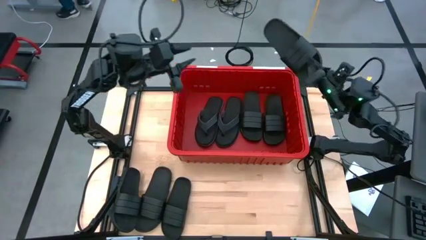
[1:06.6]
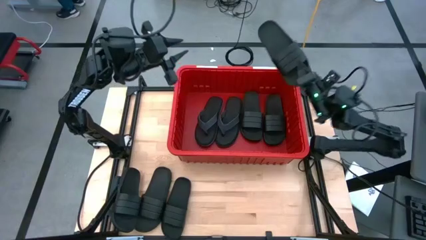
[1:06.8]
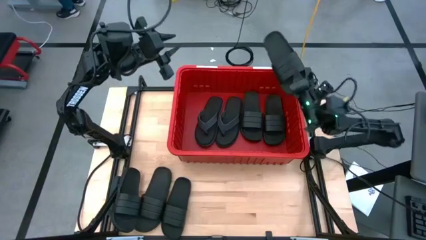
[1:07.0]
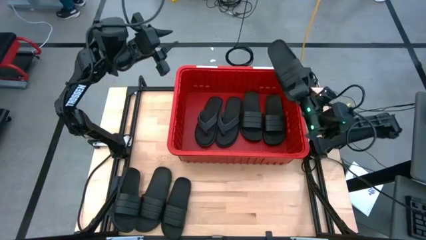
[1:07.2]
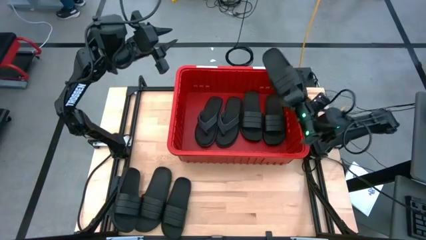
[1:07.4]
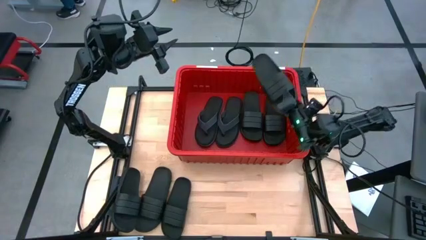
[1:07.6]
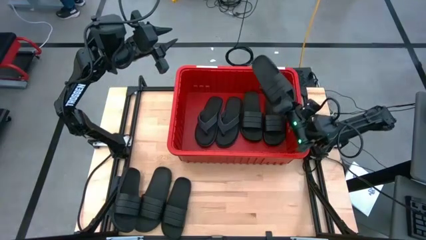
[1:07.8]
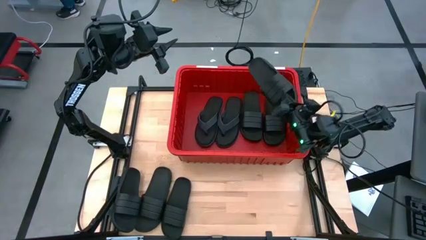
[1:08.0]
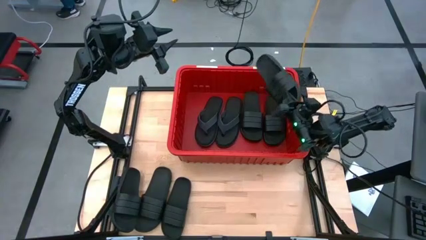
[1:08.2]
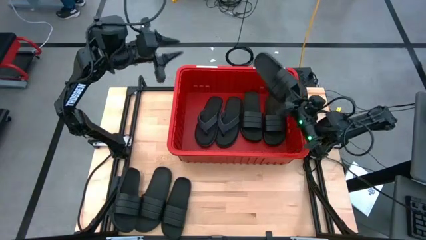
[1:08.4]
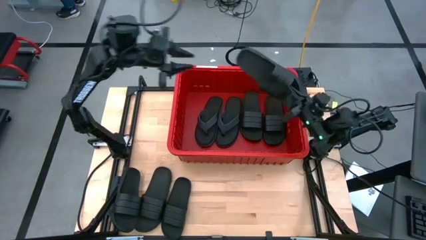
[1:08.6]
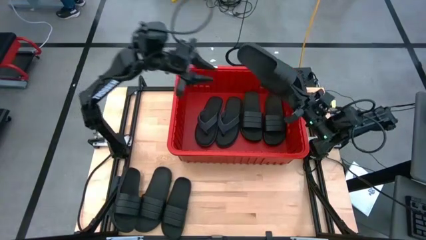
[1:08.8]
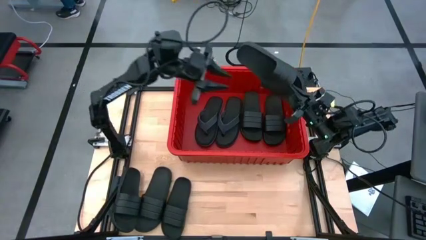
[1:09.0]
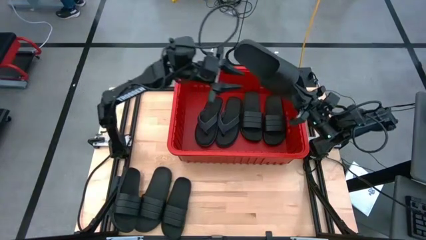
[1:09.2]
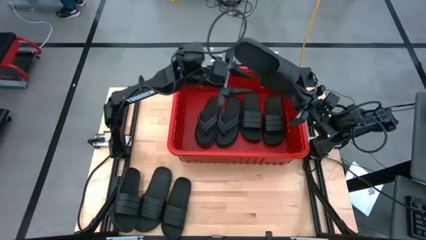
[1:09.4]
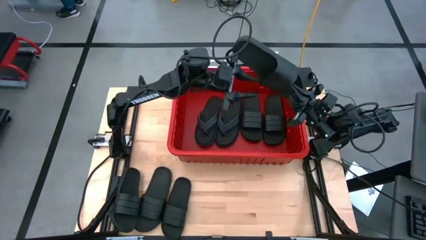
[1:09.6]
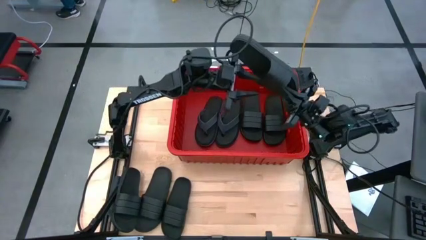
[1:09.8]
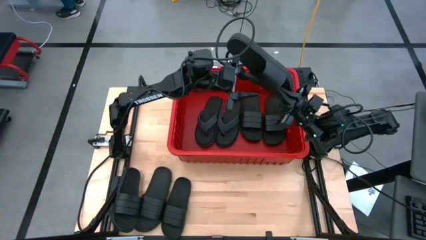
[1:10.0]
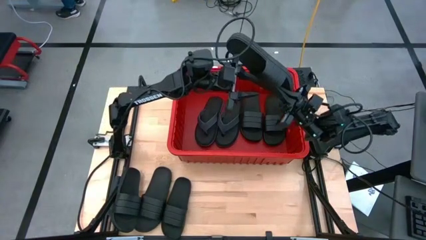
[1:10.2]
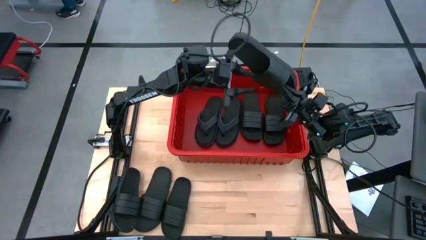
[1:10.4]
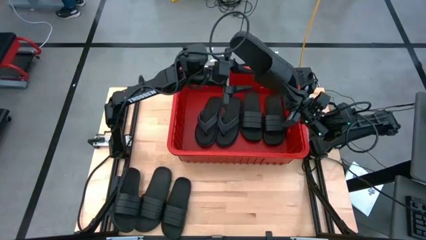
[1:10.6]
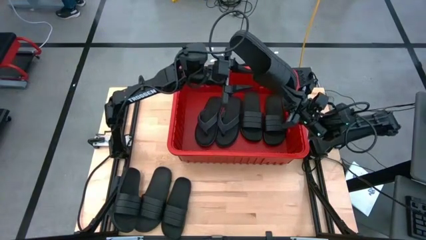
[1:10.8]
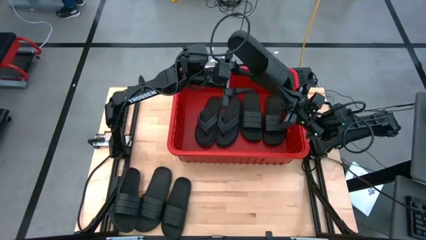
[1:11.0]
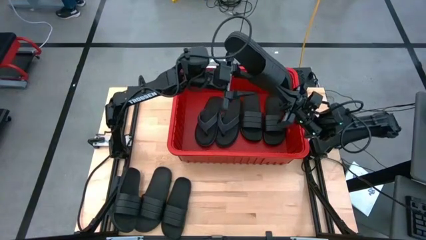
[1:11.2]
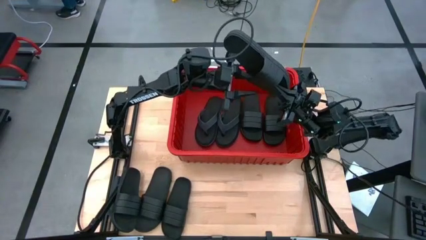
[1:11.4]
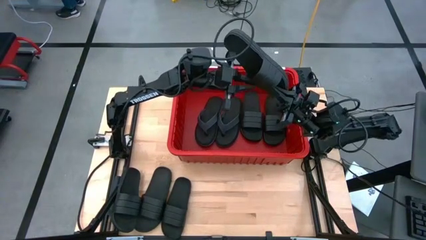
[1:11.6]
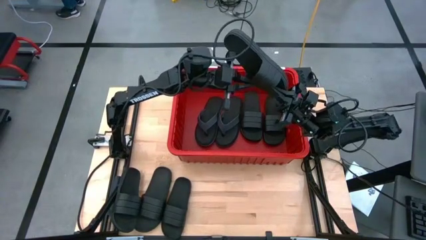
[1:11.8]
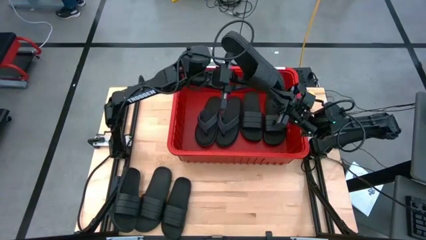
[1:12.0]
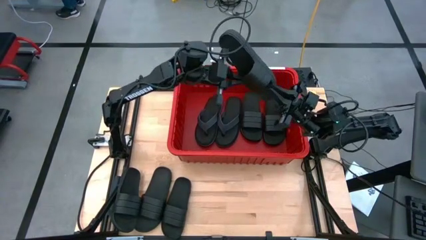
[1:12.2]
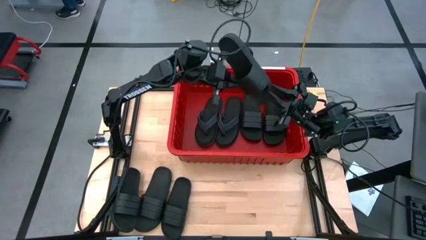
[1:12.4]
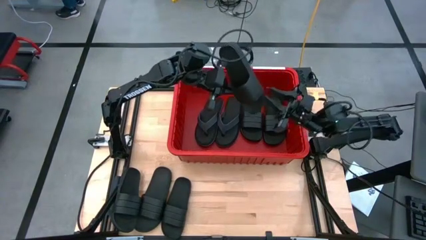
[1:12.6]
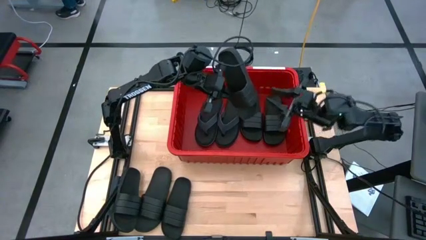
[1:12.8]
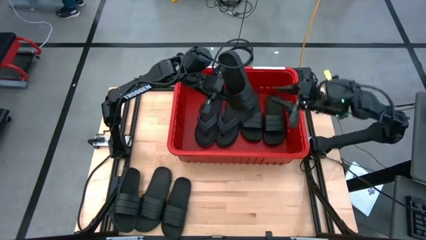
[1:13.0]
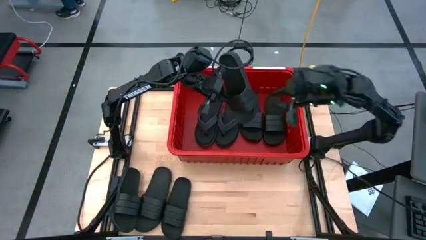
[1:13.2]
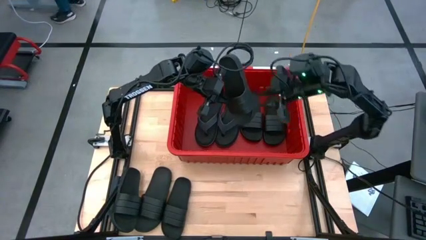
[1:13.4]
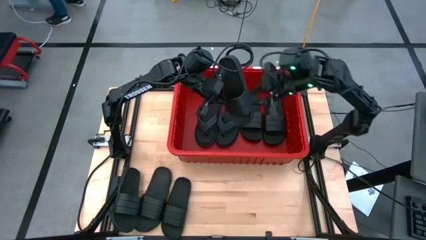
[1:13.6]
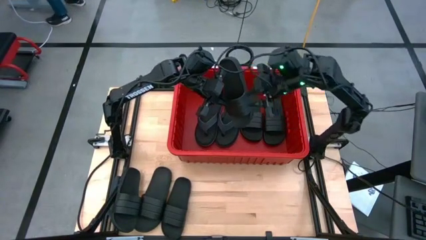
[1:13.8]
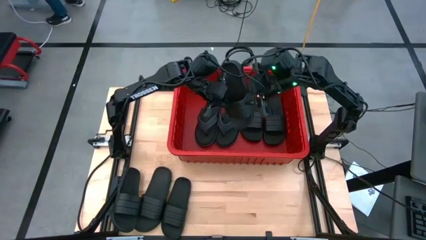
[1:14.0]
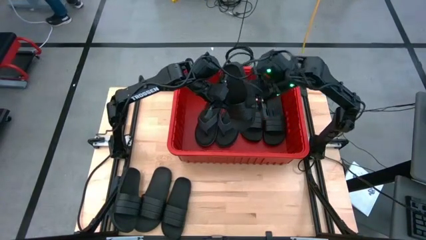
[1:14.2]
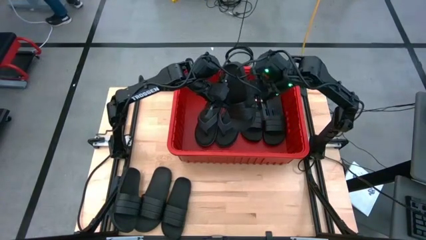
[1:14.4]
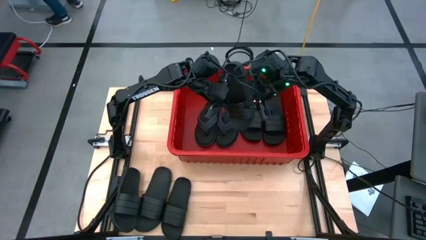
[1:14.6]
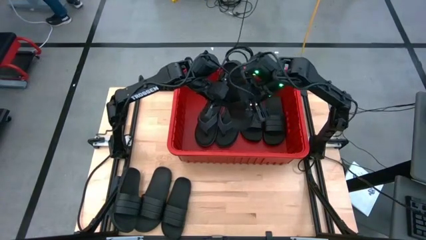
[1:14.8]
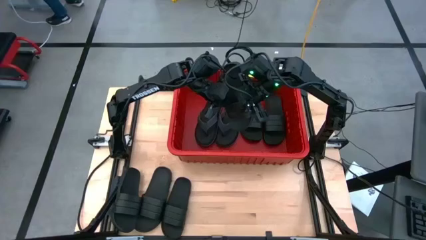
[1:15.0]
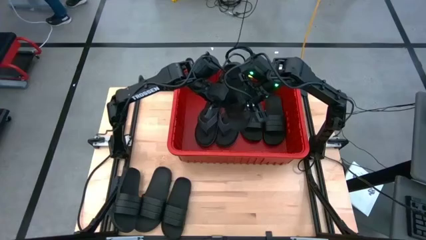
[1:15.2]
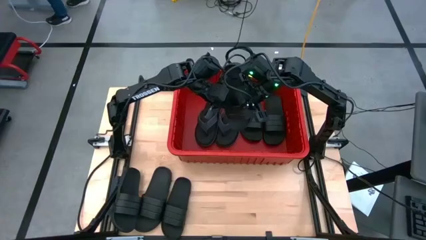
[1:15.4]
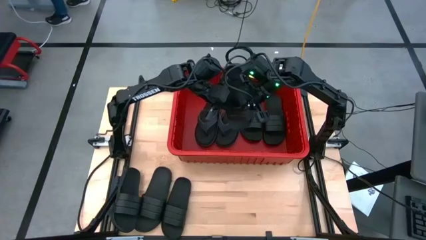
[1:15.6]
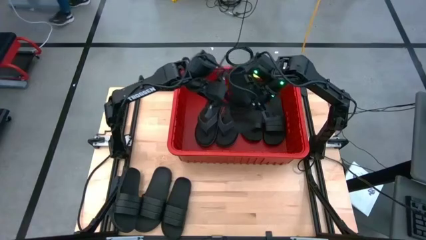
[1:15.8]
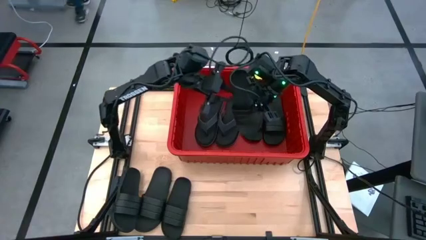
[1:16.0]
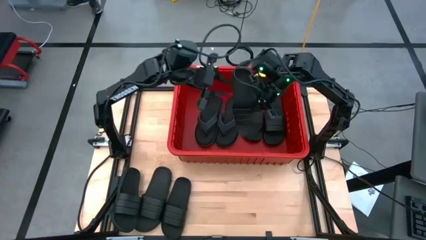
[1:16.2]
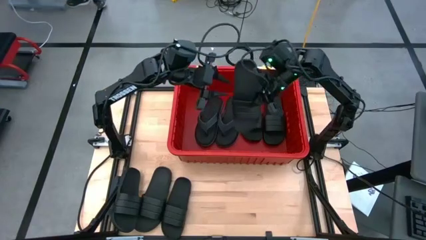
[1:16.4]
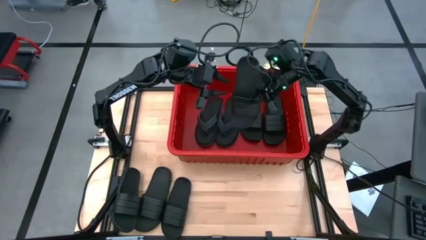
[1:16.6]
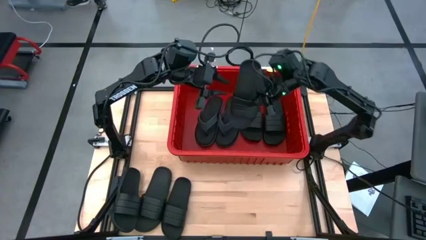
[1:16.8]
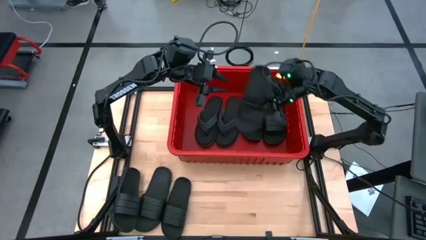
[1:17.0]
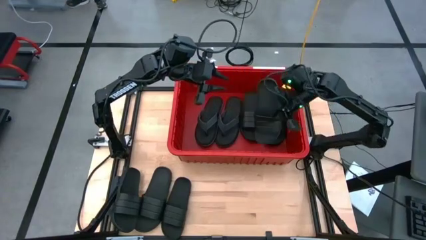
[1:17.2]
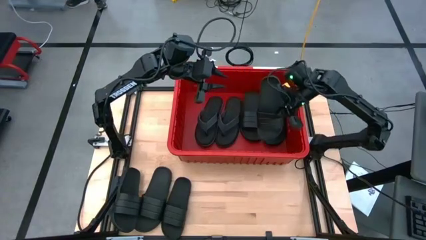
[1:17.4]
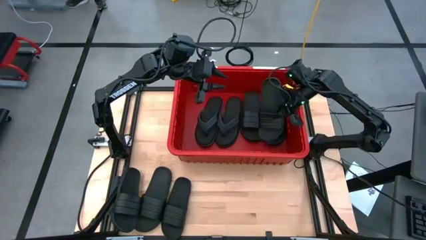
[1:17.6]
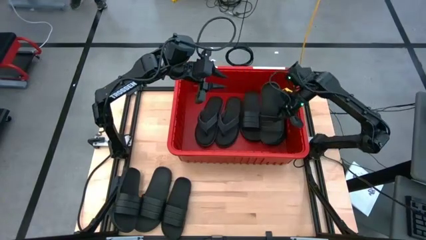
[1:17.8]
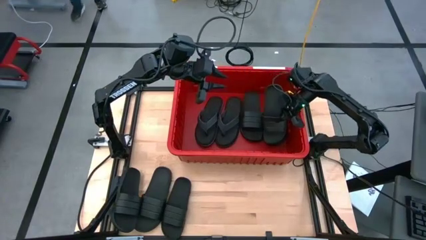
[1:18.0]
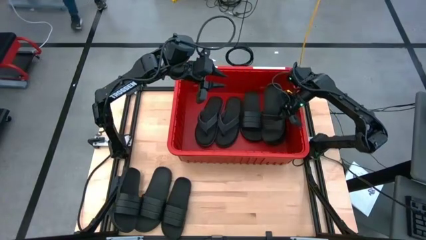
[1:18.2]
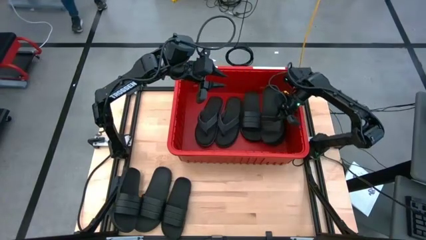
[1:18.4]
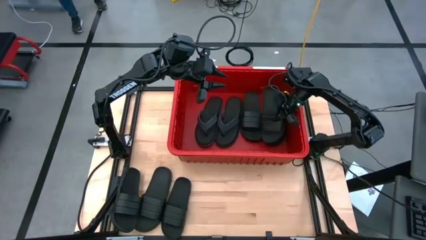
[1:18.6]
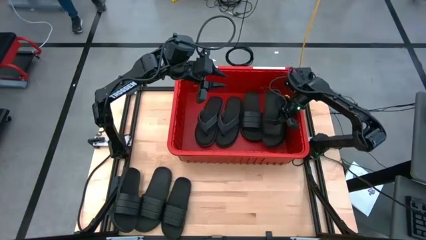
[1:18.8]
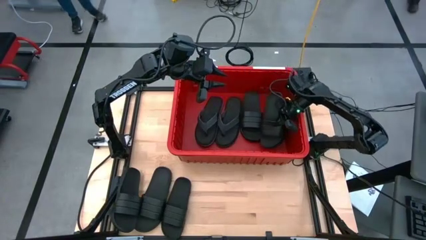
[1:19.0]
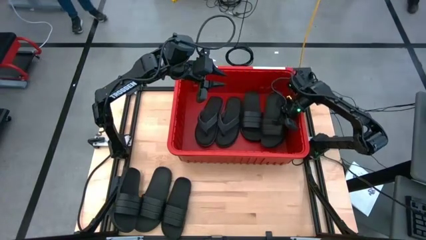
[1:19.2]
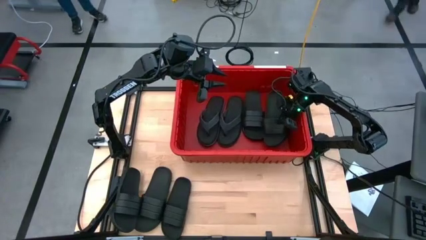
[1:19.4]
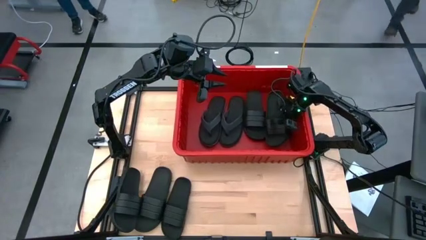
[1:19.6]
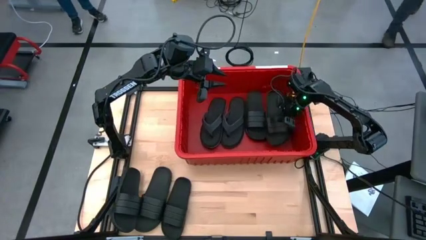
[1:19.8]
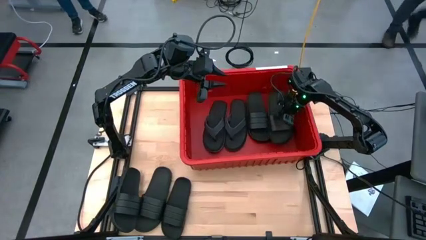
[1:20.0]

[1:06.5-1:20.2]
Task: Pick and place slides into bin
Put the black slide into the red container

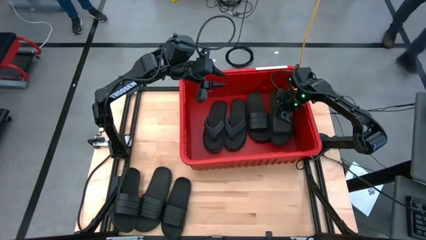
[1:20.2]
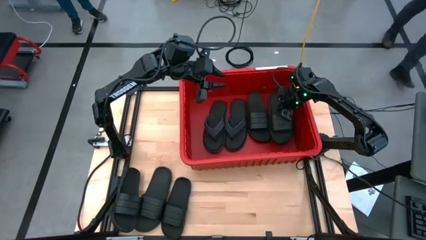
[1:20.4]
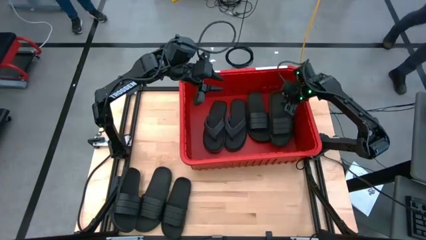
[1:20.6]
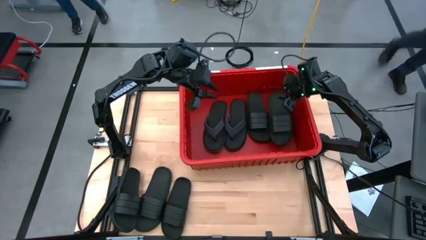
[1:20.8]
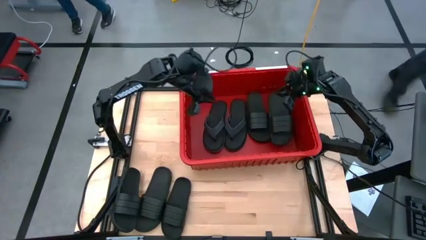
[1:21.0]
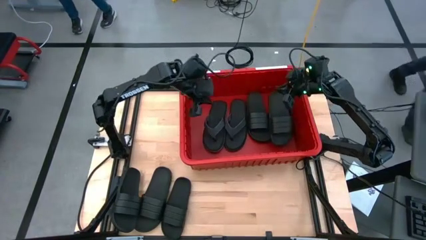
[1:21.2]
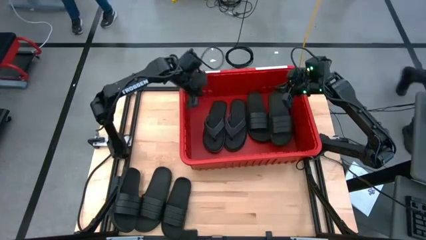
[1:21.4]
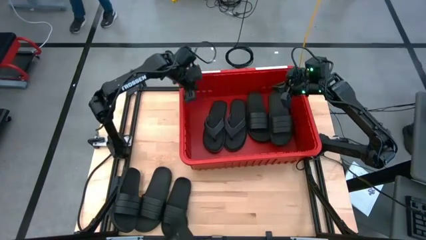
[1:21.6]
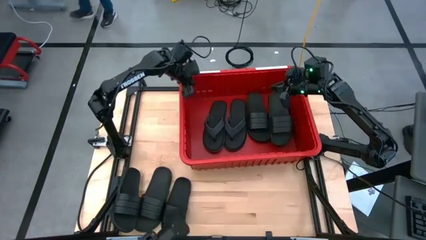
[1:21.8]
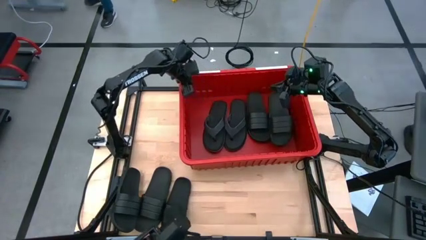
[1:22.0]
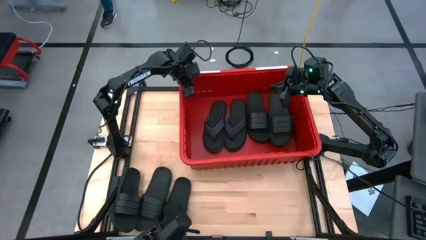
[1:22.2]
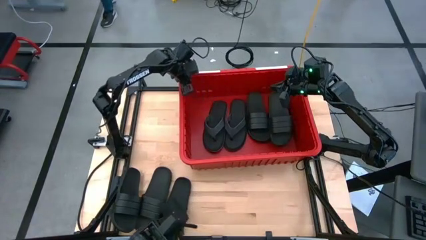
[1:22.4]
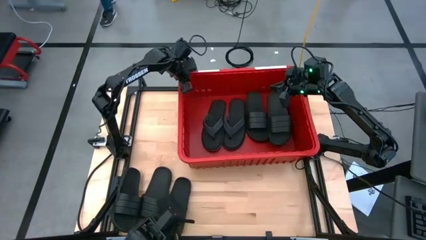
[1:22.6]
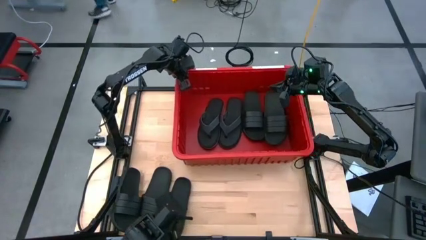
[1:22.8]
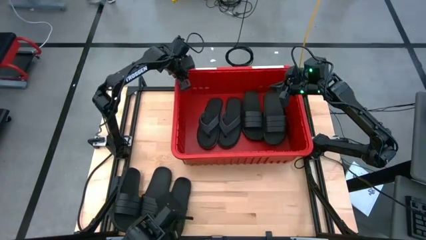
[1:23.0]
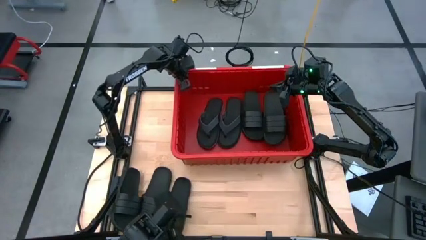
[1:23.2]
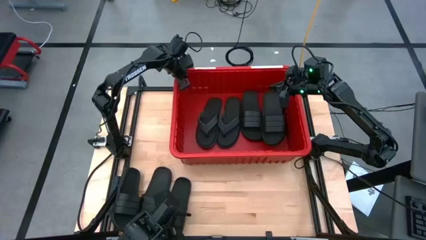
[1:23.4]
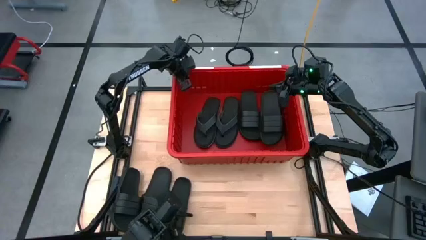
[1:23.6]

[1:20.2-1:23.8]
Adjust the red container
